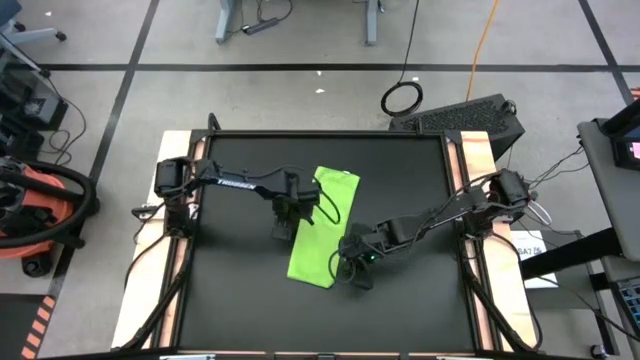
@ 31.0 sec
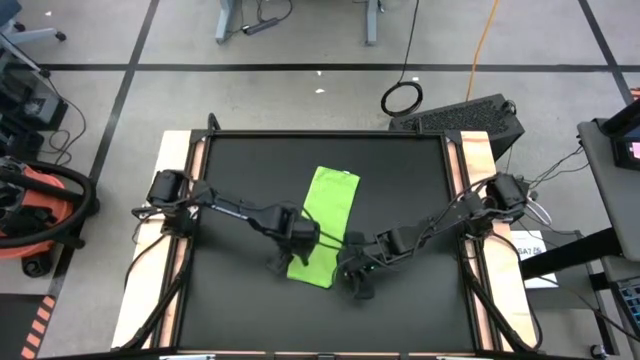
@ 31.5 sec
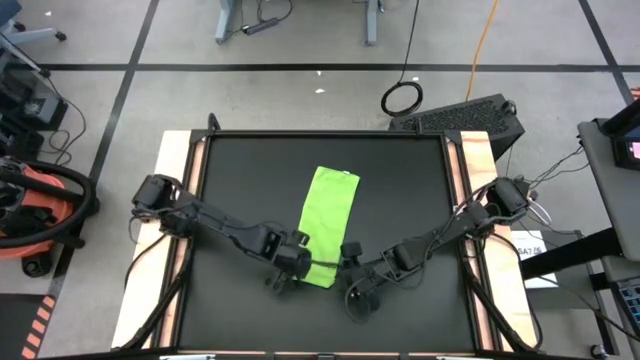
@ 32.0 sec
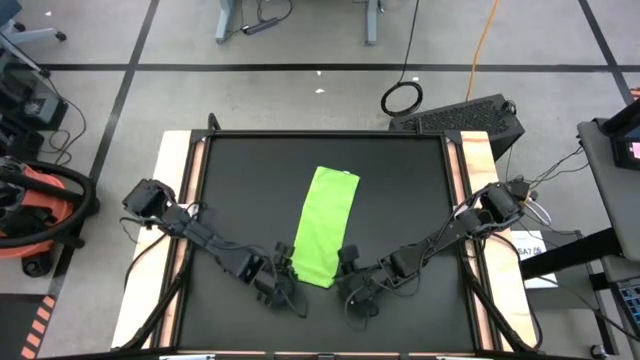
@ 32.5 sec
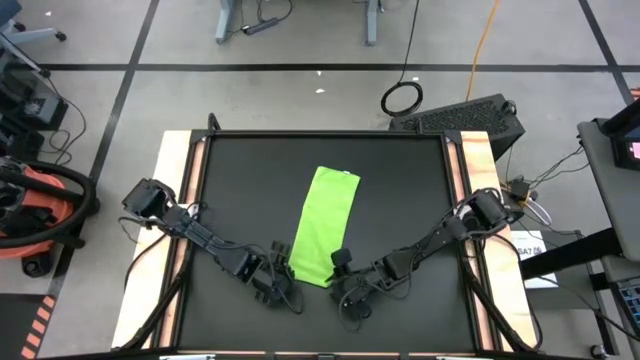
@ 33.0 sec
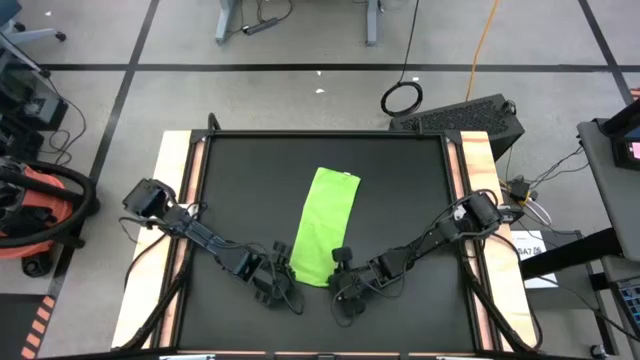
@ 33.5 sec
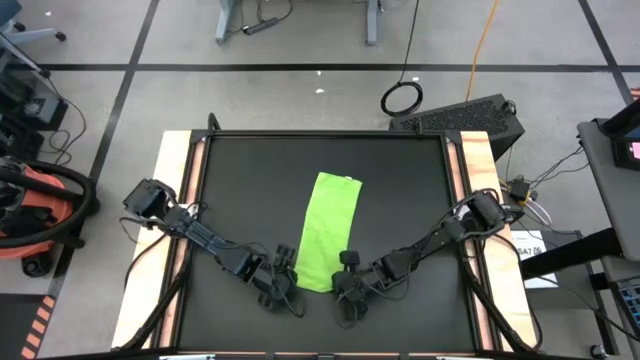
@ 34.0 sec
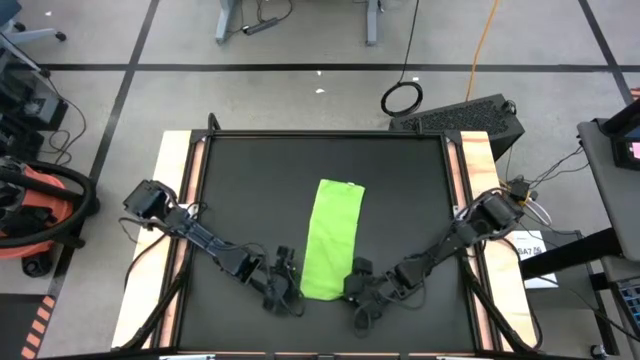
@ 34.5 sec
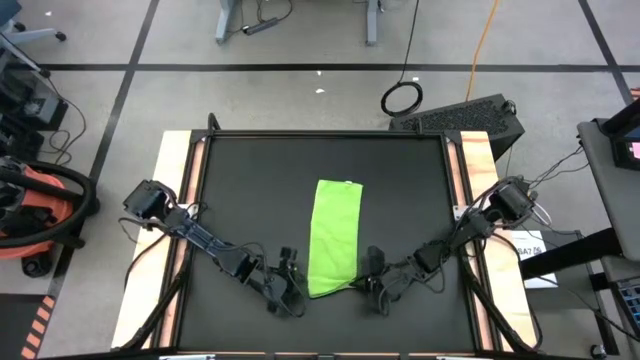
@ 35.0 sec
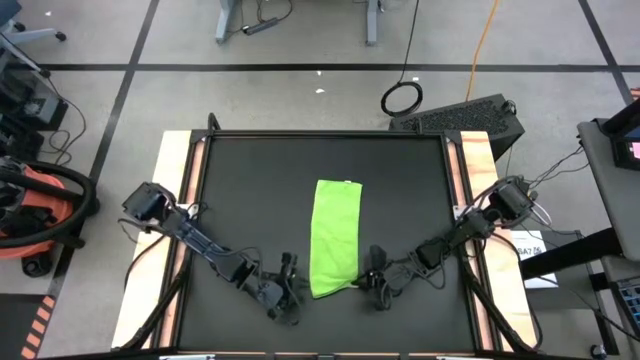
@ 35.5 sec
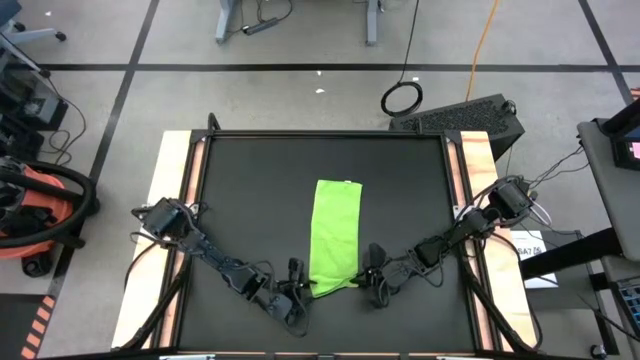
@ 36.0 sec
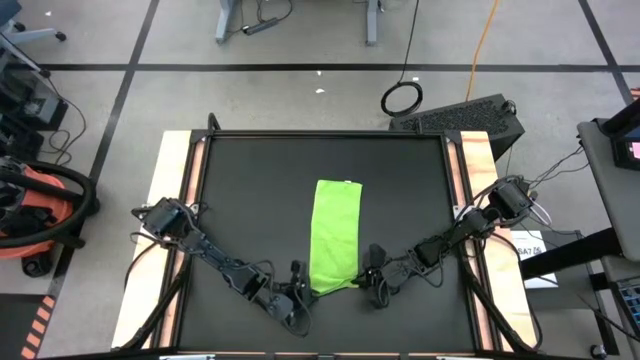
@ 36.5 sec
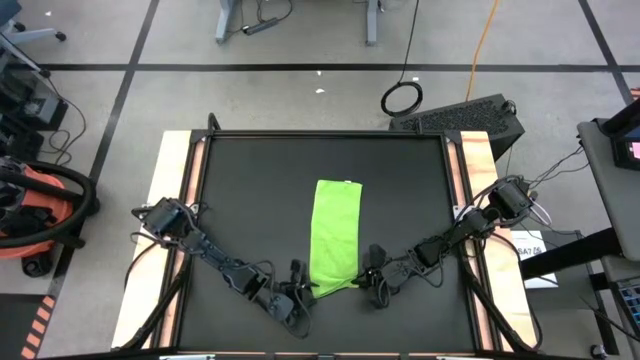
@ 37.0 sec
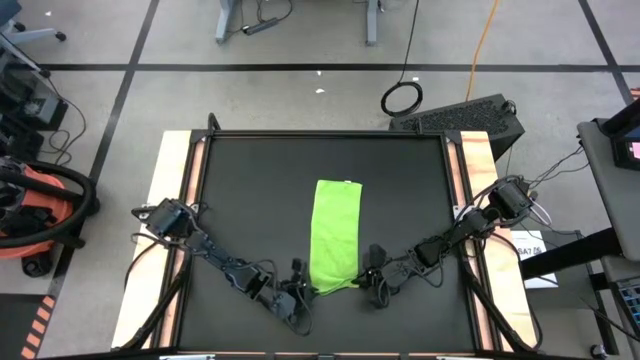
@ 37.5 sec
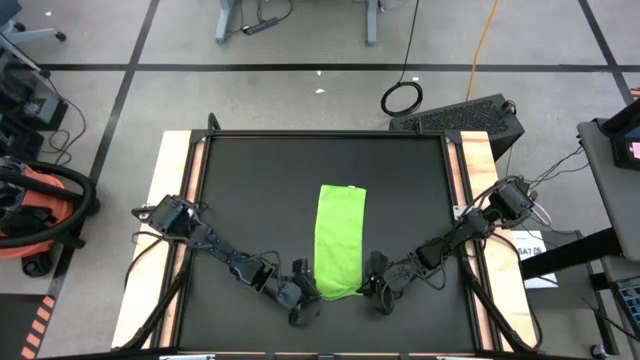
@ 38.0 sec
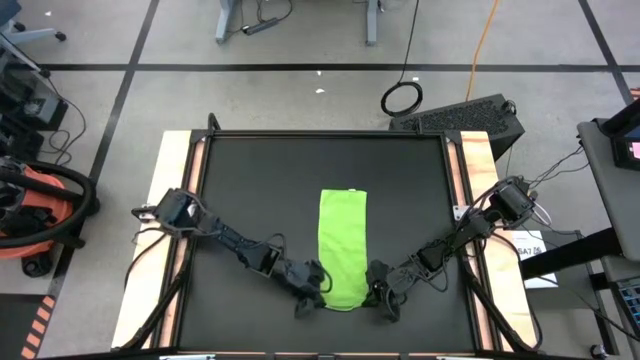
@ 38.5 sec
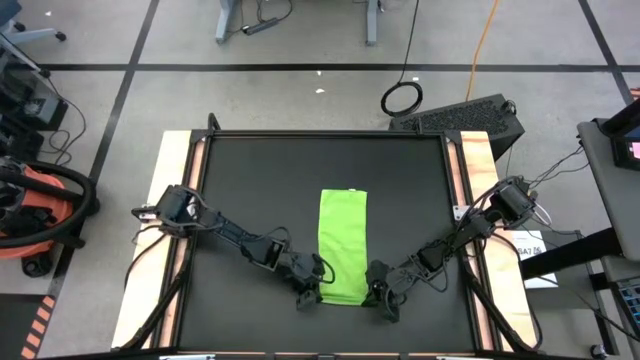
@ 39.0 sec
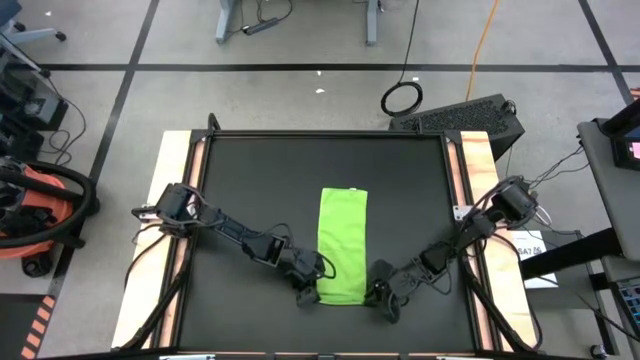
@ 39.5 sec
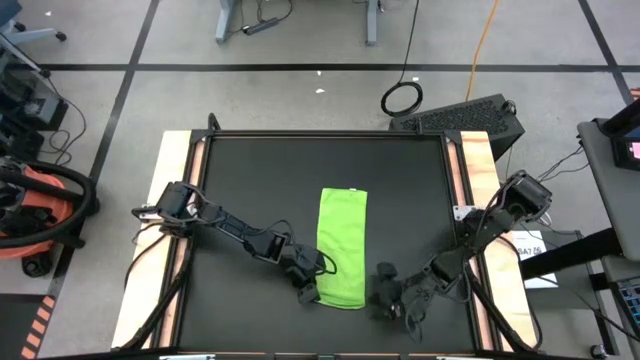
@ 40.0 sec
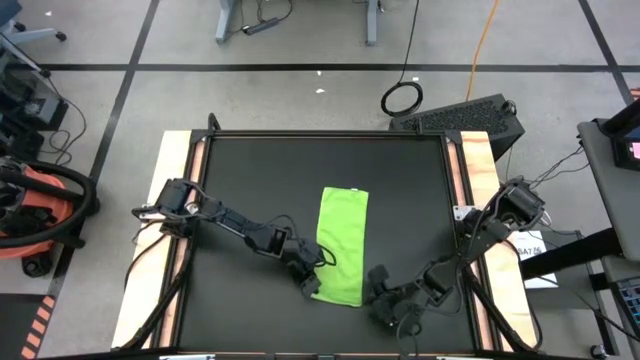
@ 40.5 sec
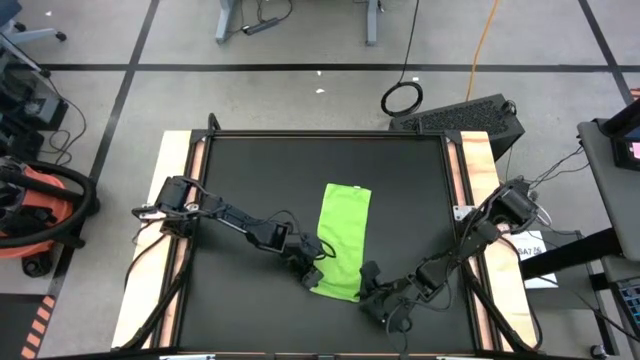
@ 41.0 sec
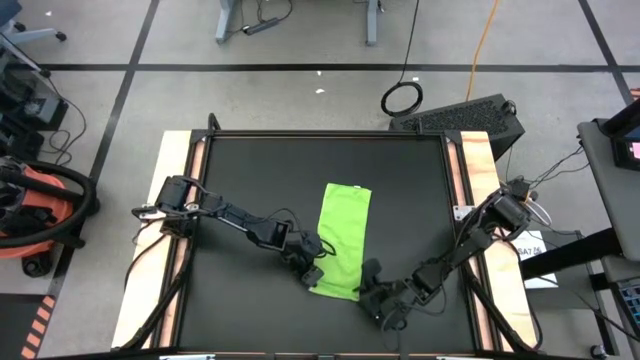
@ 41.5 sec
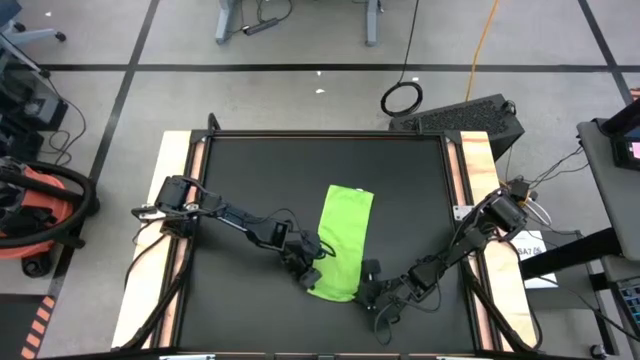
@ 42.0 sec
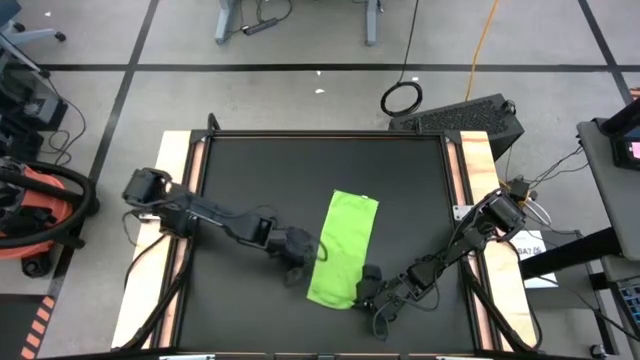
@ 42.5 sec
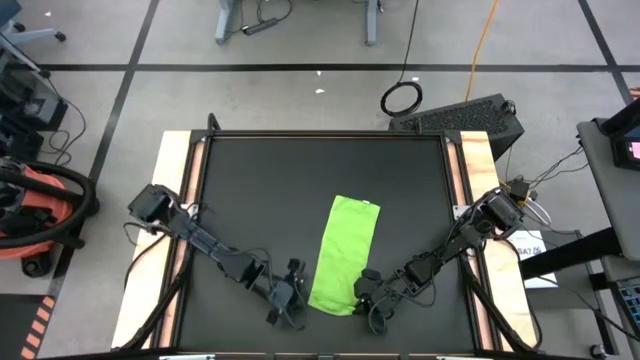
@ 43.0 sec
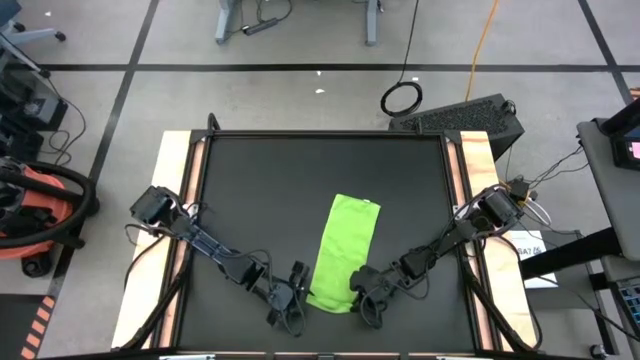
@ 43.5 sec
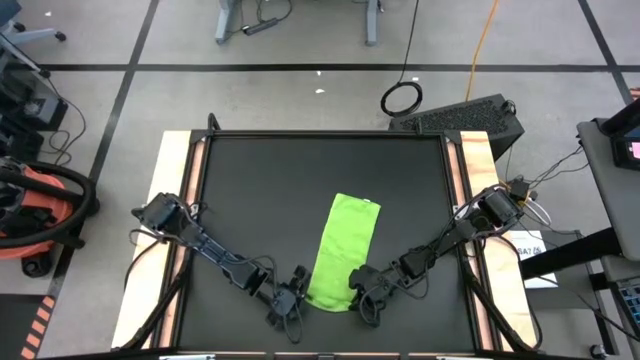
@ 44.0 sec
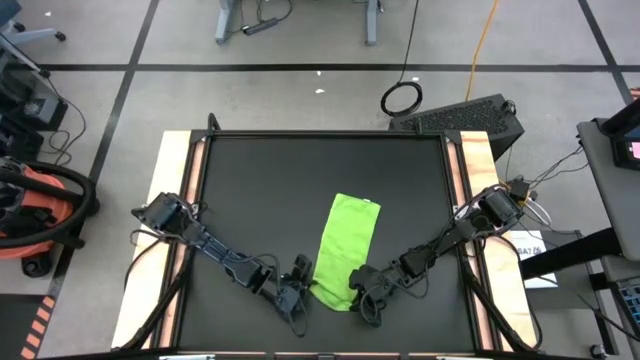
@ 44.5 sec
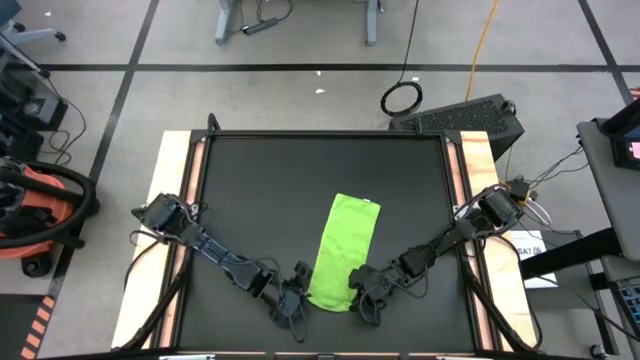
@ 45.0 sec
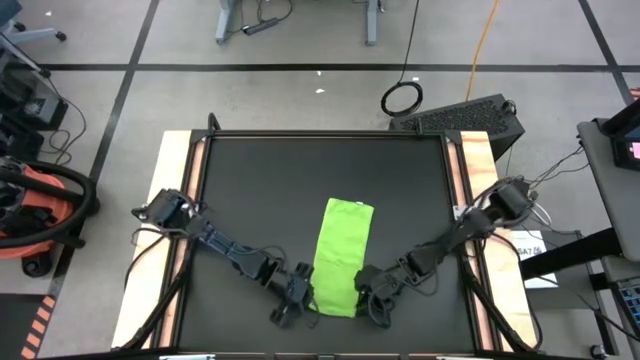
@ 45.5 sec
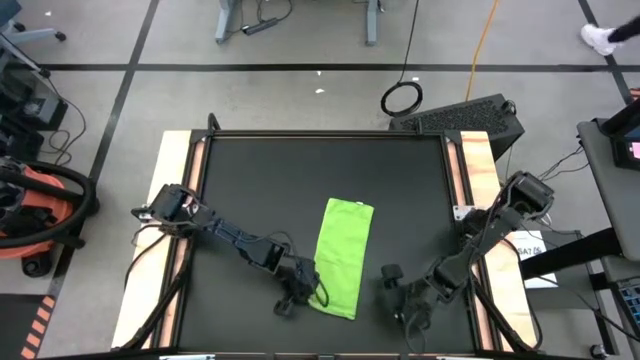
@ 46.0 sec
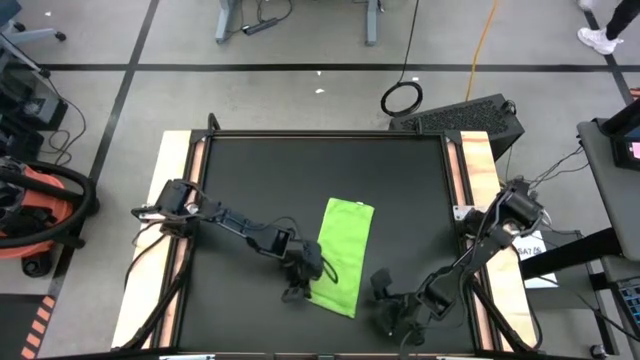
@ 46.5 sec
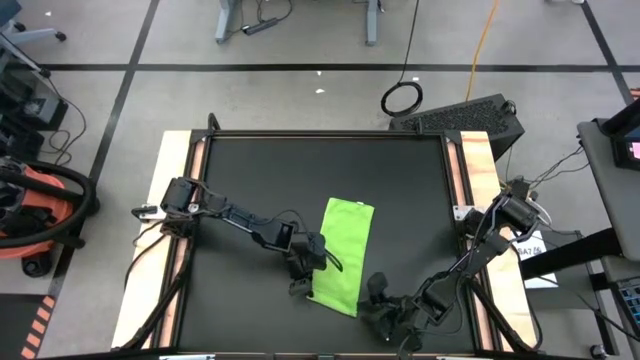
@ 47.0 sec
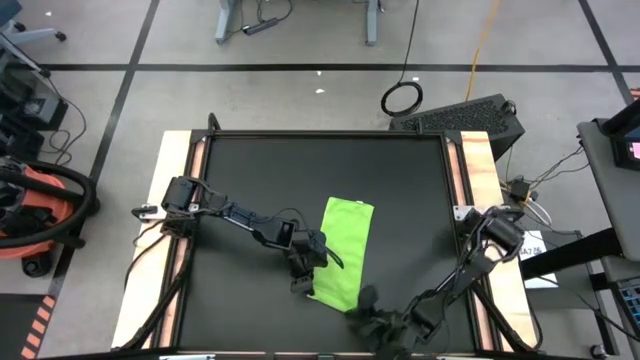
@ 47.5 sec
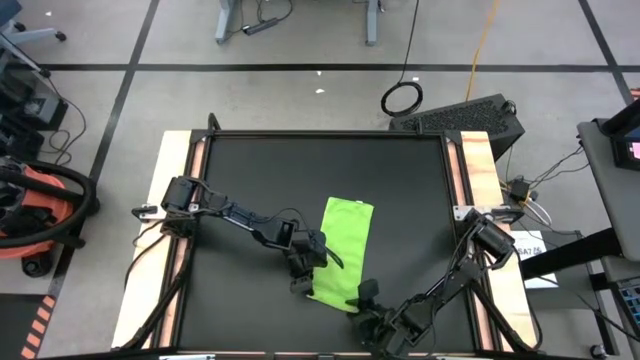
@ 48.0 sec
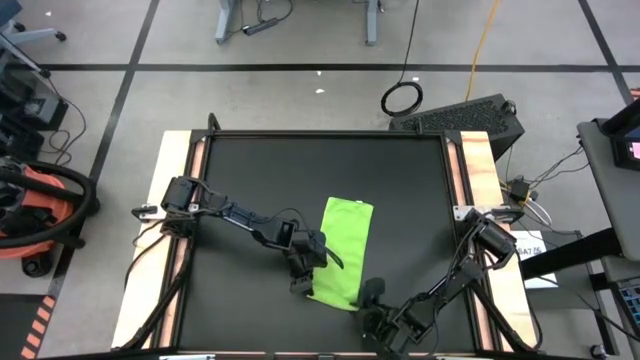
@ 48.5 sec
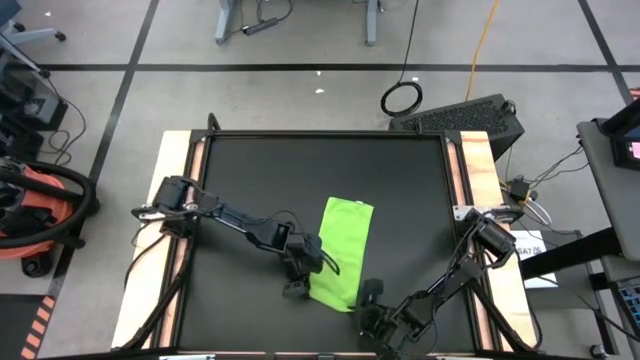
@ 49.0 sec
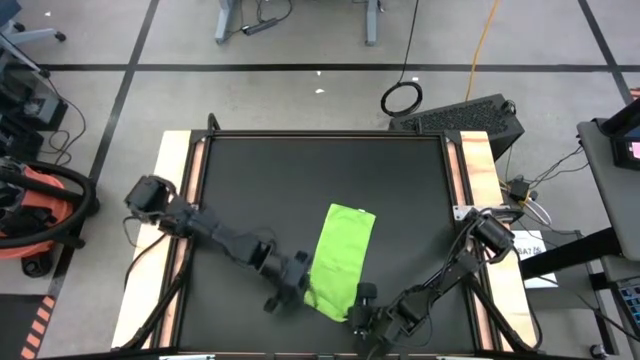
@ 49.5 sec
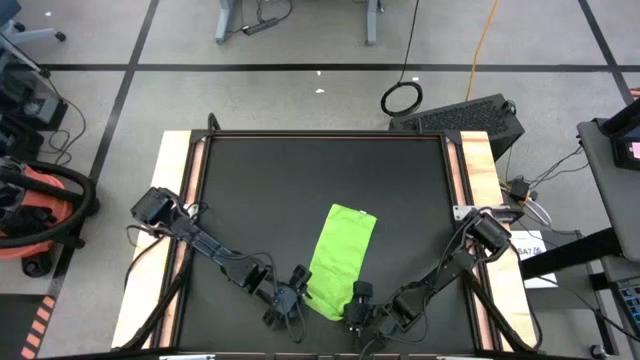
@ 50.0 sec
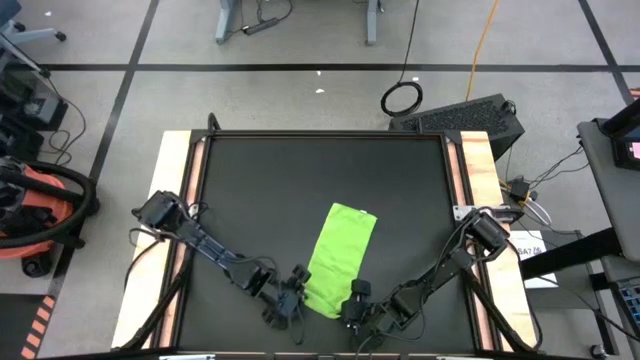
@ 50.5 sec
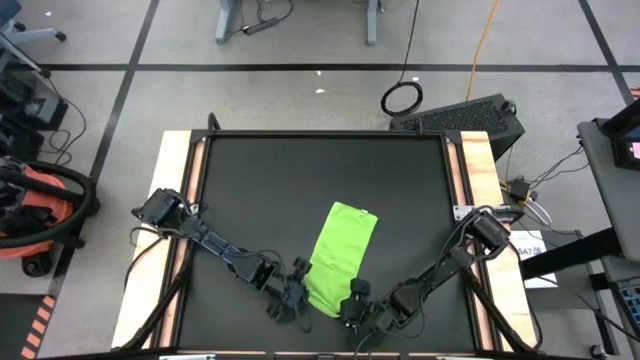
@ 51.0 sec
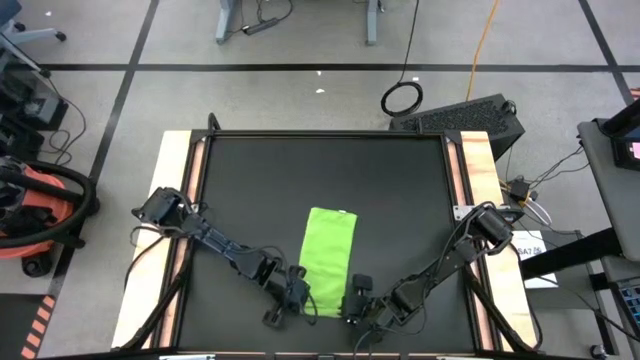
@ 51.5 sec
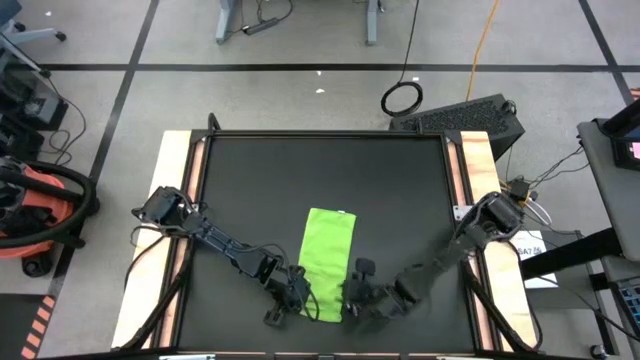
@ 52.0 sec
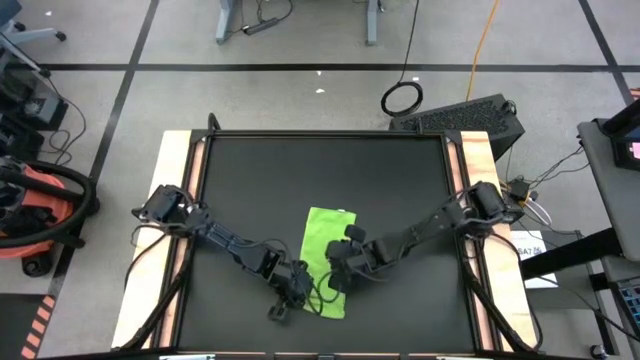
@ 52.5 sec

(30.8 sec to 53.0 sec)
Task: Roll towel
Roll the green microfiber cloth
